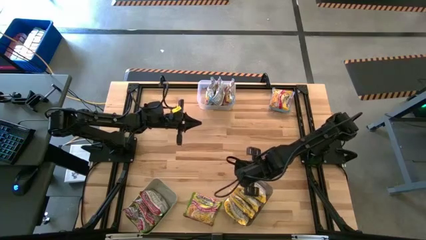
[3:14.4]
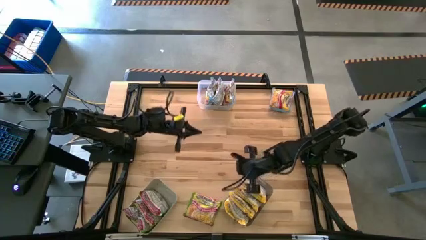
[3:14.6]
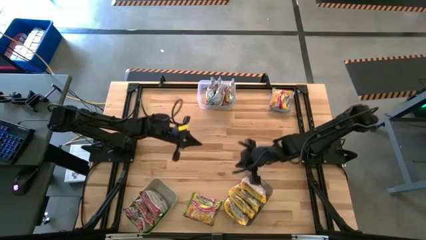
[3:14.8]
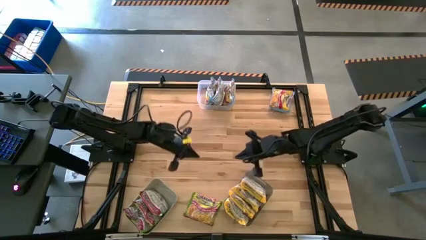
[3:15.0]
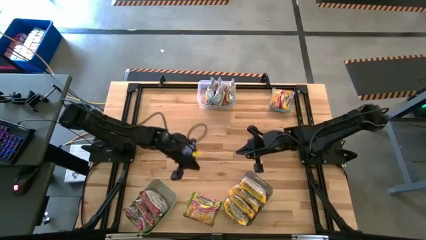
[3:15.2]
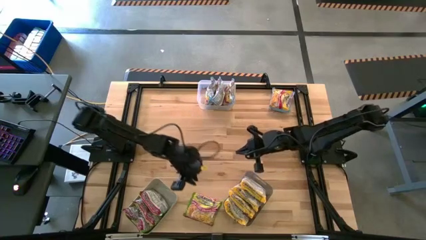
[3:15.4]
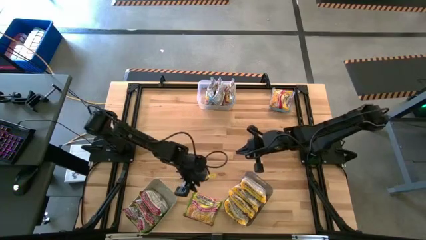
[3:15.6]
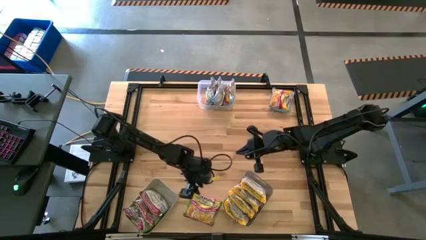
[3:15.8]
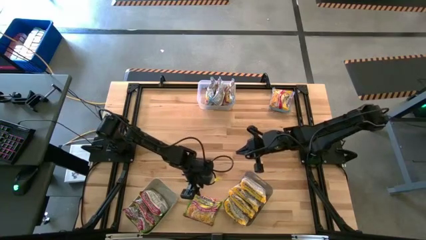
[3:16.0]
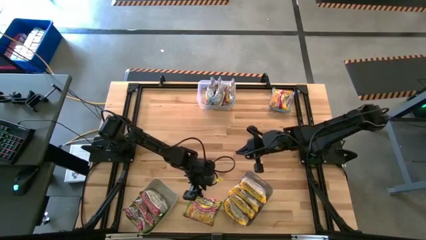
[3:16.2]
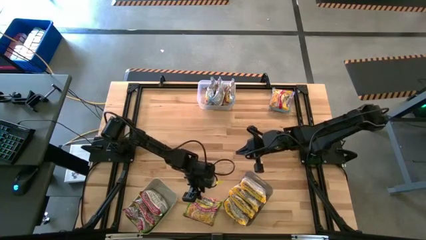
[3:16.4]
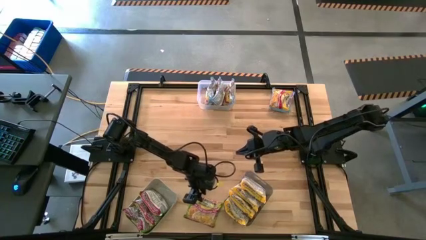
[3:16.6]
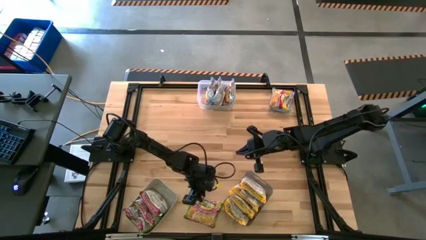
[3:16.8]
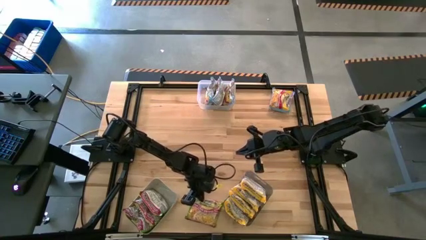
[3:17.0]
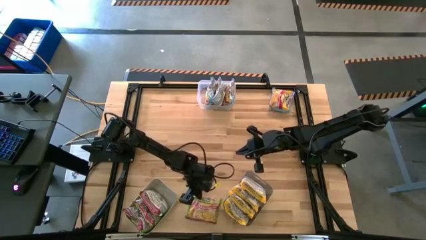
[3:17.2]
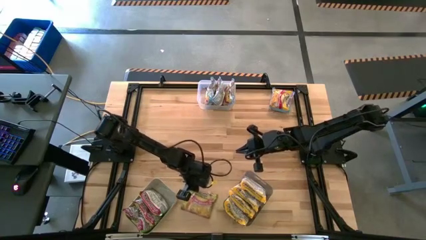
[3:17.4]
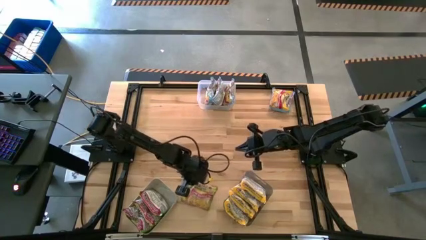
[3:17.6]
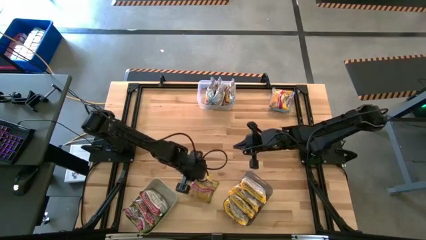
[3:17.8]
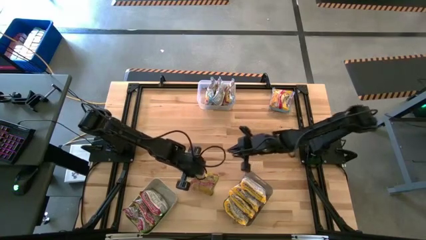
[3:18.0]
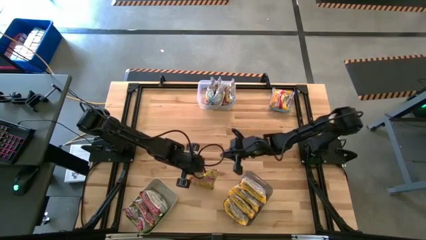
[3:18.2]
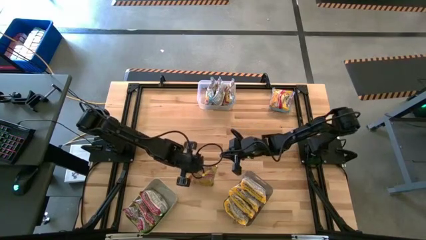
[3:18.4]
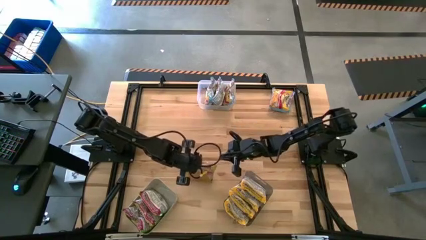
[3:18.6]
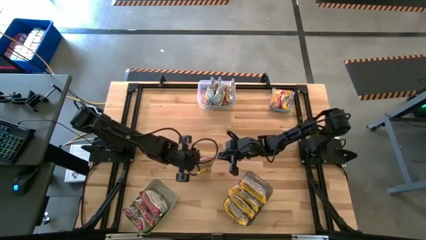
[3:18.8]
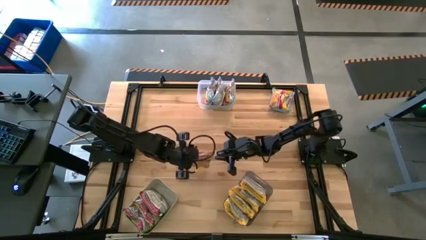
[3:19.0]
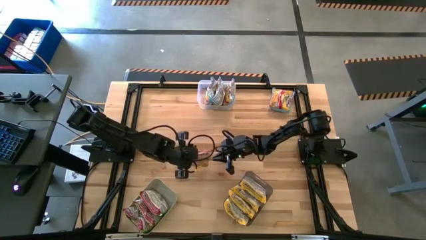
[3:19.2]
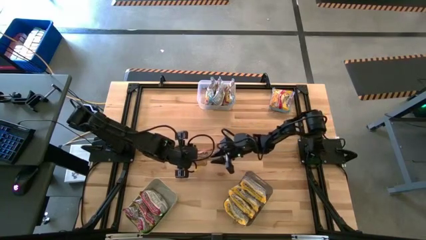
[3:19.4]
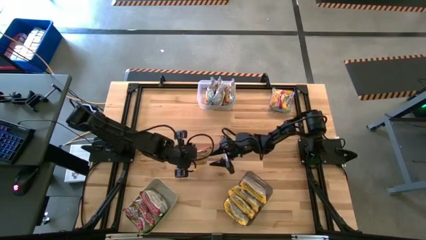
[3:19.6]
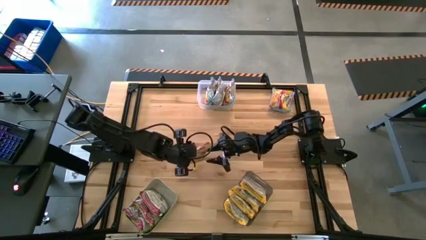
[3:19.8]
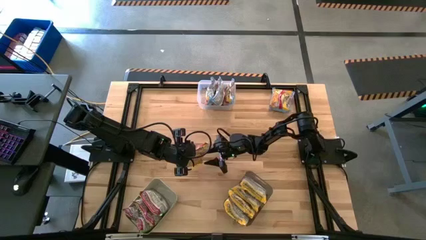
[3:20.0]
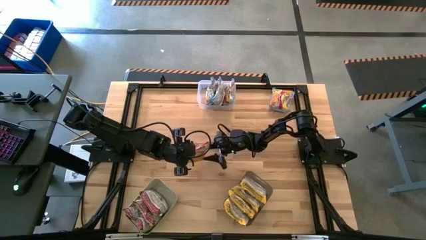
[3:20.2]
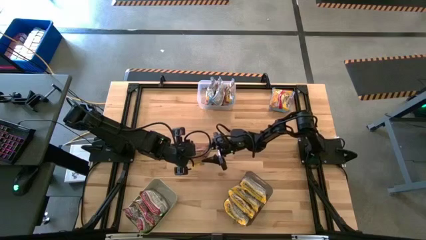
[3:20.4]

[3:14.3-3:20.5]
Task: Sort Maruchan noodles
Put the green noodles pack into the gray bin

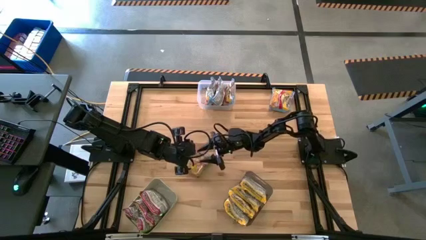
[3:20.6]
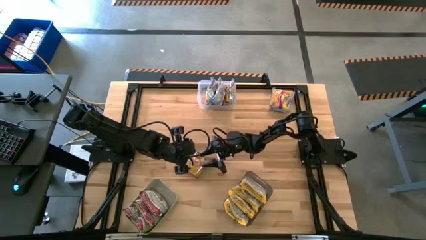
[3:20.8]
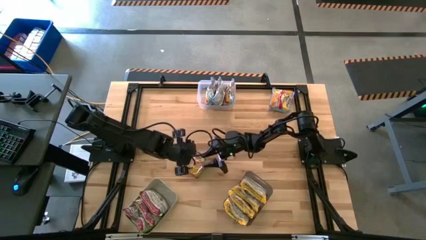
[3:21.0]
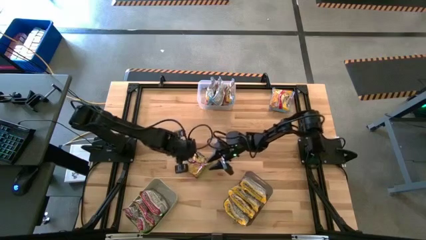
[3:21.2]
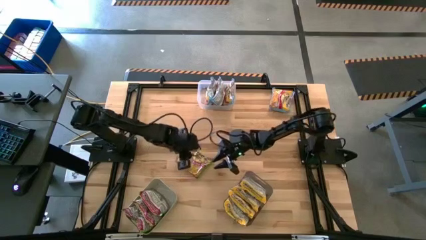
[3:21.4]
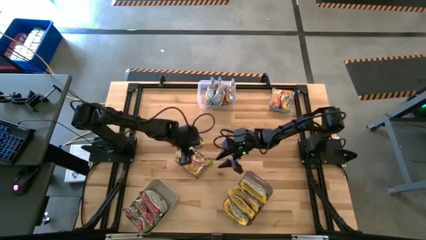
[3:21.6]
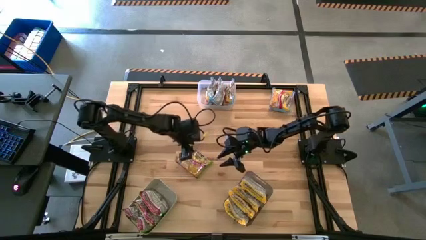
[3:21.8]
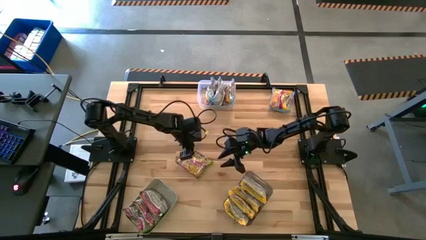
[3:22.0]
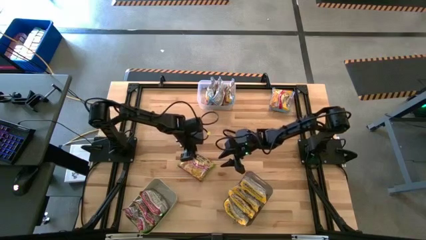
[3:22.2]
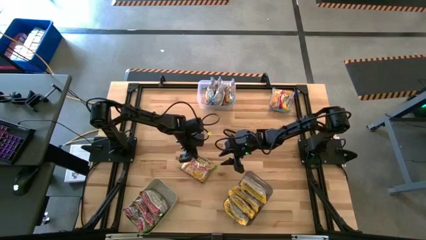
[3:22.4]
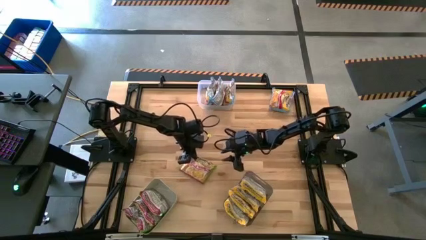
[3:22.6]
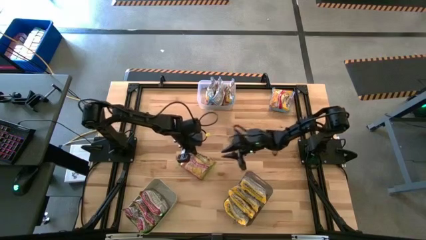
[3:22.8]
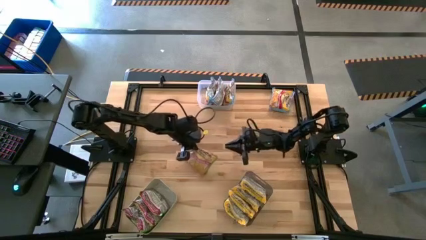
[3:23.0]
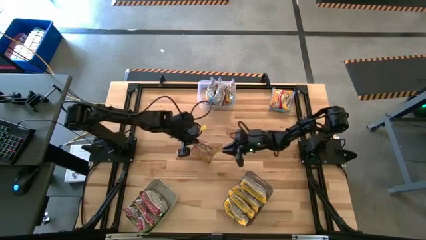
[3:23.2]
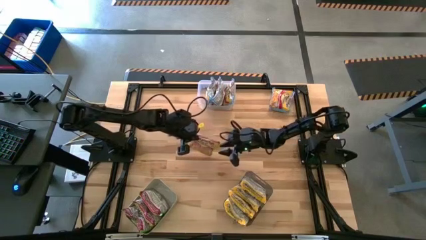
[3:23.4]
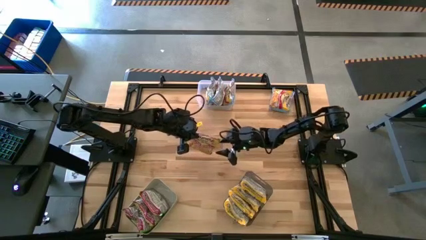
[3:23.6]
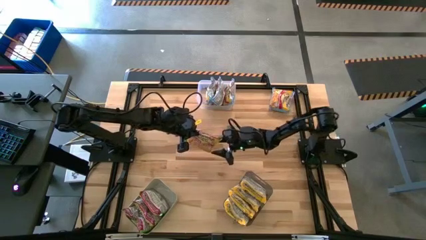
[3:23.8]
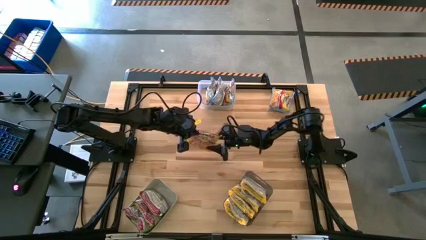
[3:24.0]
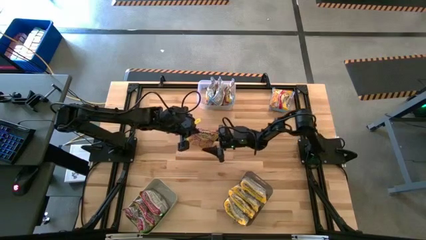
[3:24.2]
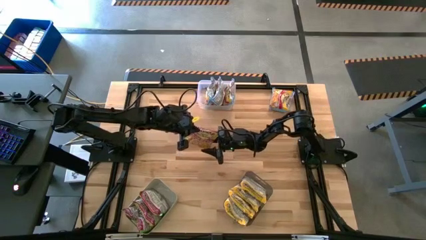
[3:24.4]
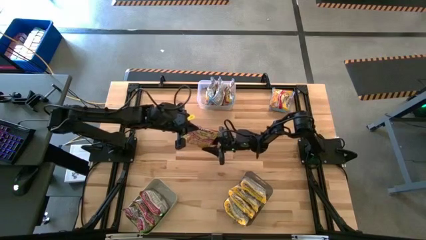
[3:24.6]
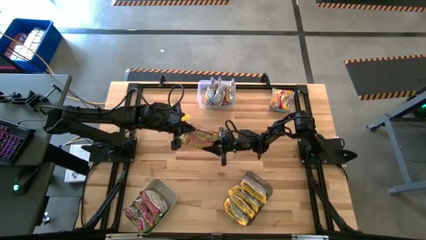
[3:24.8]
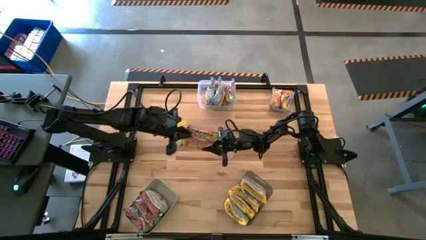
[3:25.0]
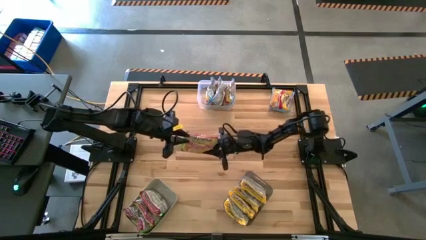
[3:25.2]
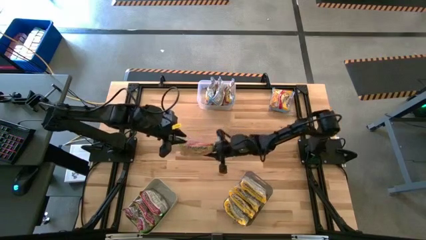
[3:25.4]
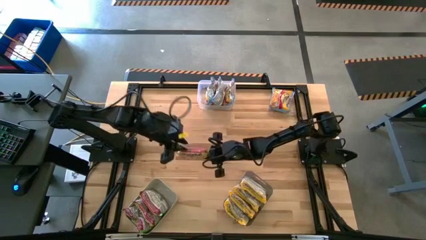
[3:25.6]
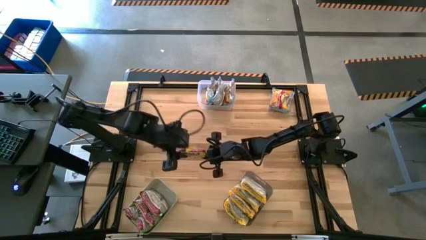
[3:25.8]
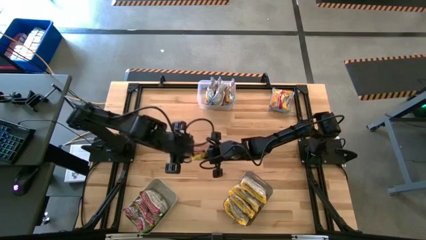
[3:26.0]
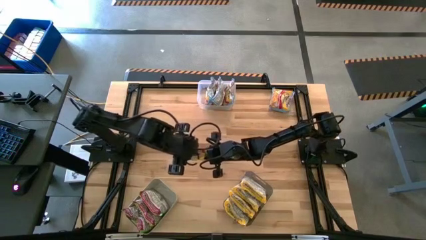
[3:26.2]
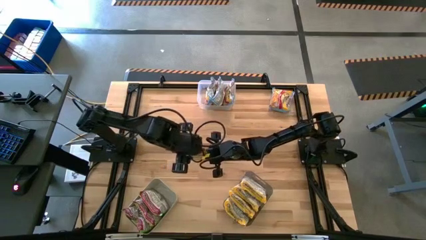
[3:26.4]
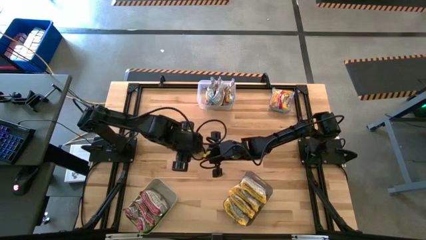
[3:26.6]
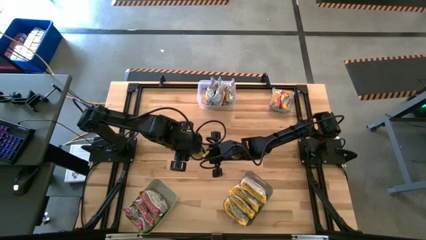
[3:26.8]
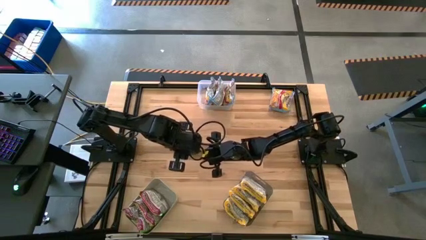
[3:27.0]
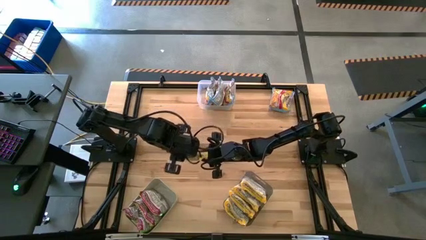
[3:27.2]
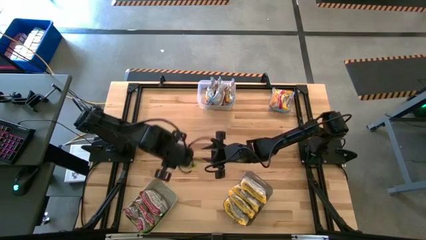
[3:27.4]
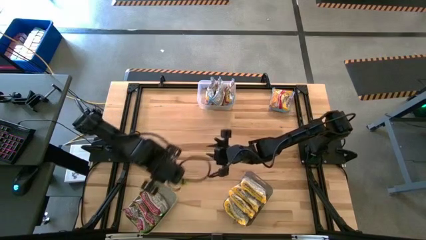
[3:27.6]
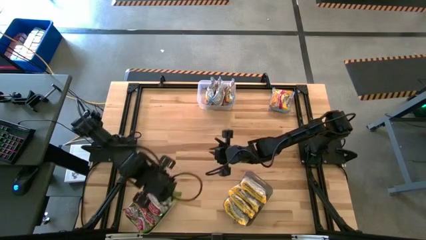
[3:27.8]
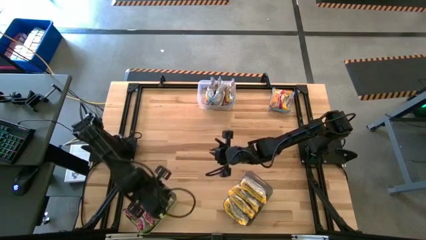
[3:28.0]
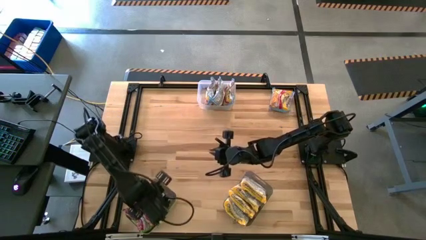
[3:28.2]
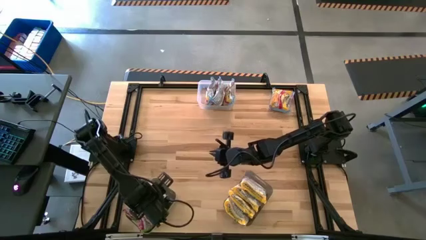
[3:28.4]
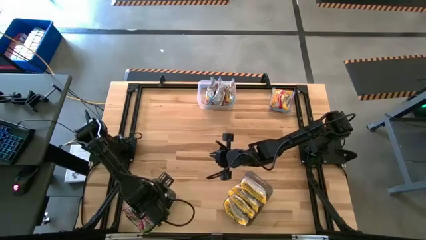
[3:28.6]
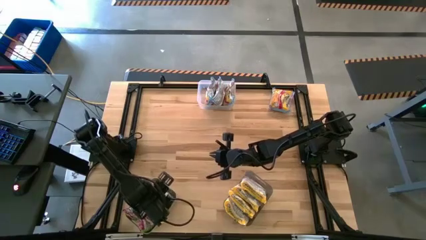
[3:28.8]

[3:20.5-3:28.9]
Put the green noodle pack into the gray bin

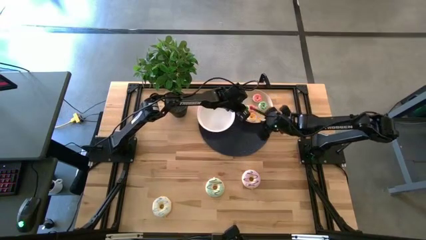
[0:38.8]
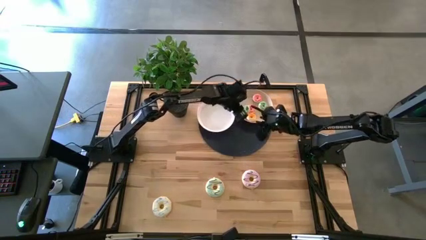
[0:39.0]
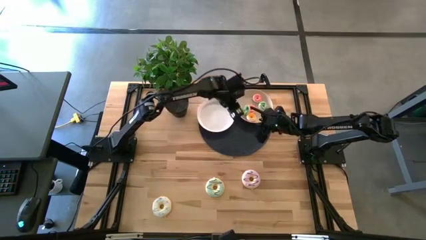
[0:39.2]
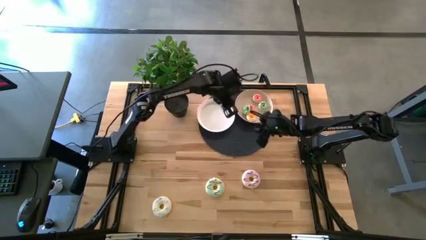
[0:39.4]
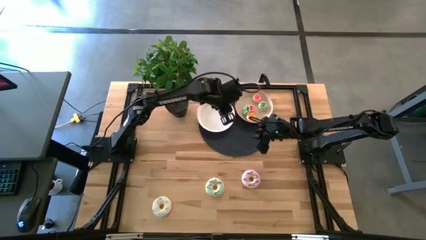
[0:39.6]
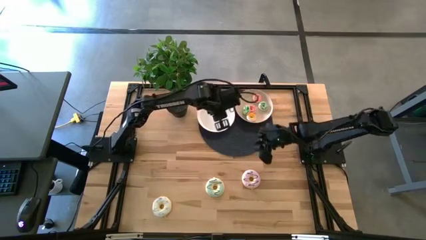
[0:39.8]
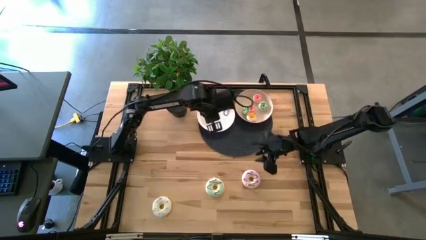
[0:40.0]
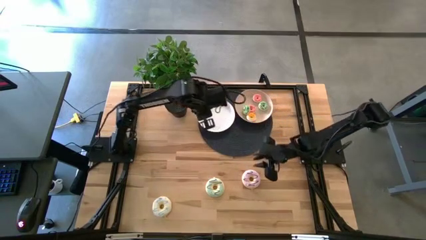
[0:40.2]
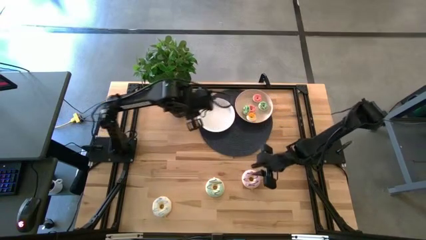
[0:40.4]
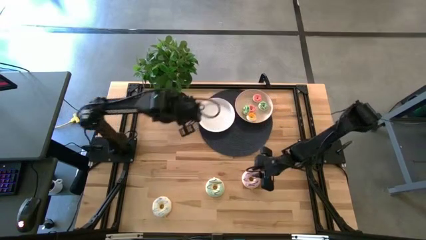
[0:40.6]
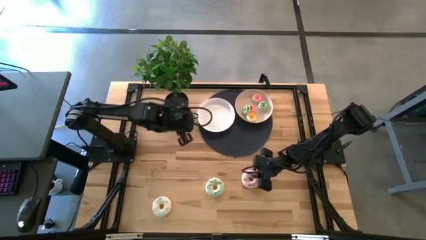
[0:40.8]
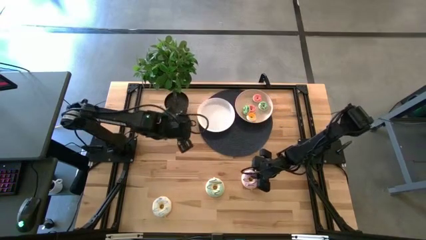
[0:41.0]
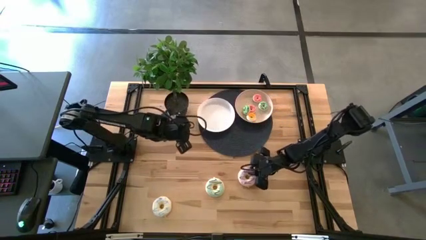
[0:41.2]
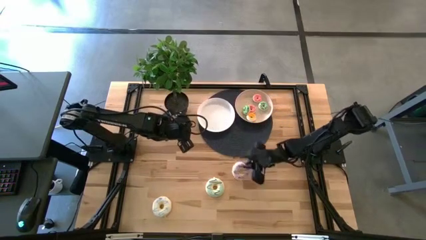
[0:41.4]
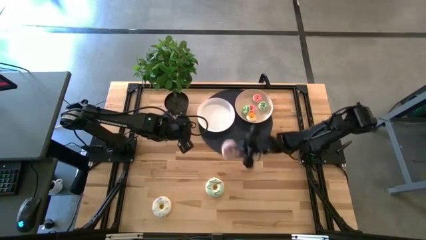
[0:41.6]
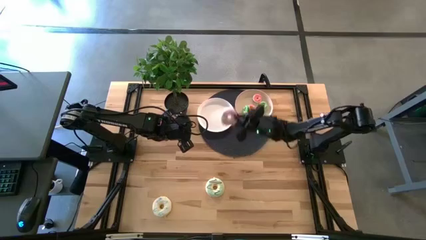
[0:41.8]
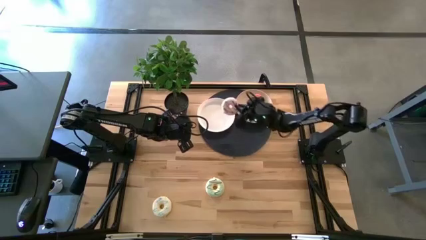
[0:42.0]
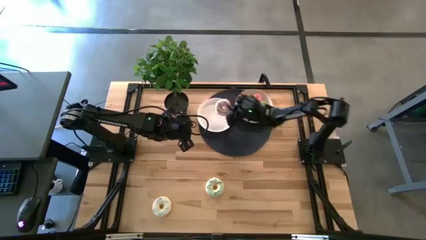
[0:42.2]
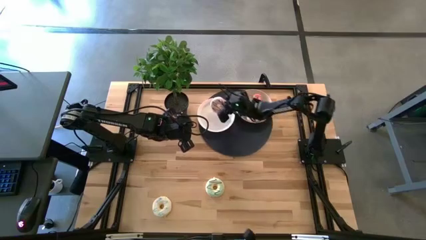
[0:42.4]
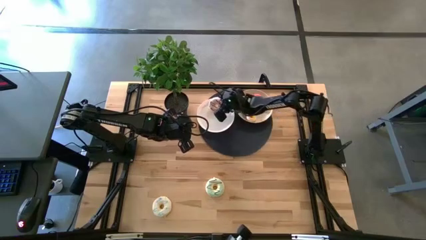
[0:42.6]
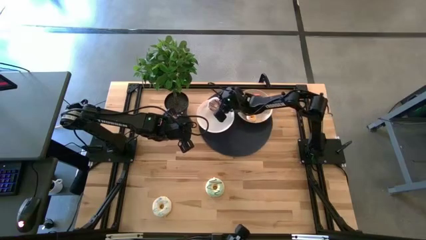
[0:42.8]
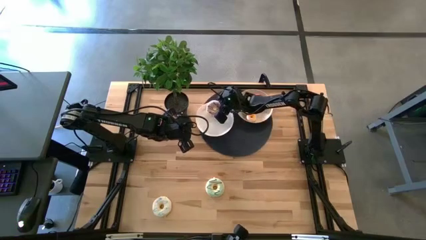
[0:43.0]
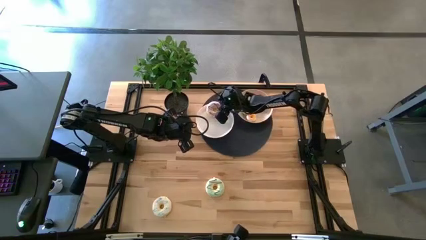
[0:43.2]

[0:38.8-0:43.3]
Task: Pick & Place donuts
Put the large purple donut on the white plate
